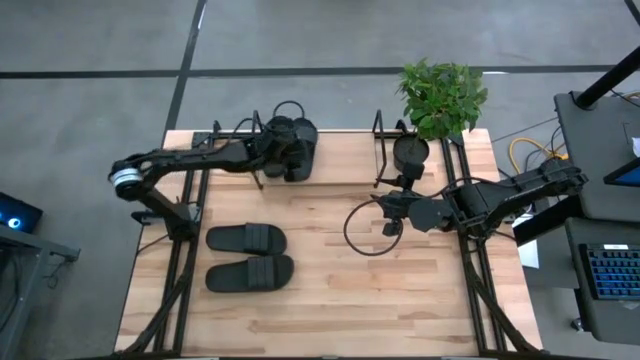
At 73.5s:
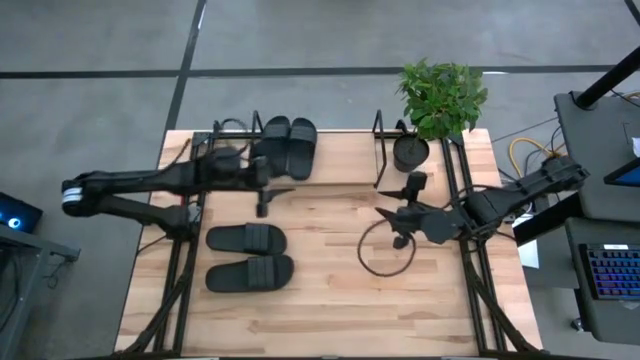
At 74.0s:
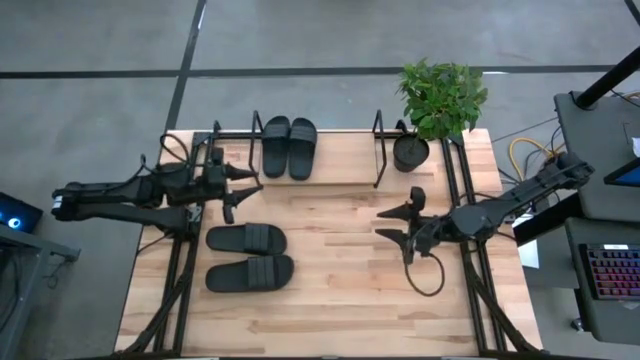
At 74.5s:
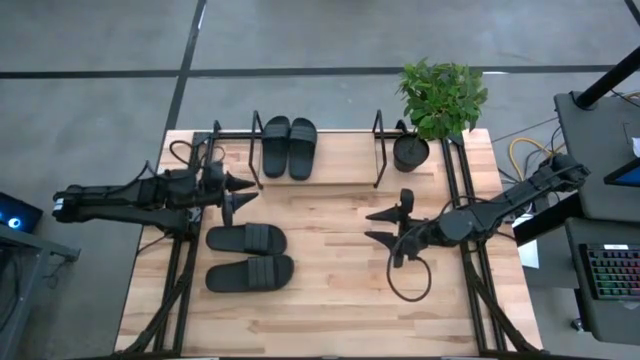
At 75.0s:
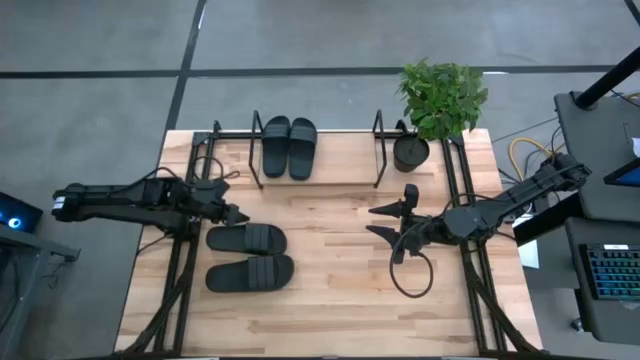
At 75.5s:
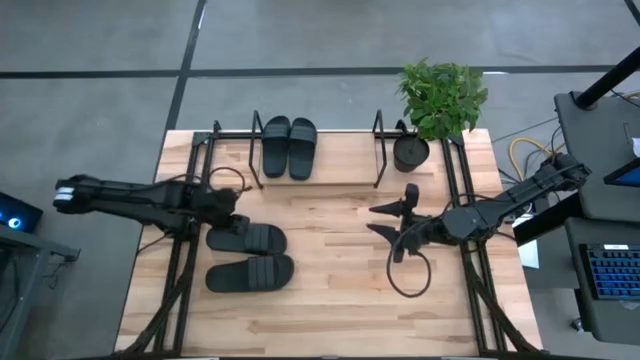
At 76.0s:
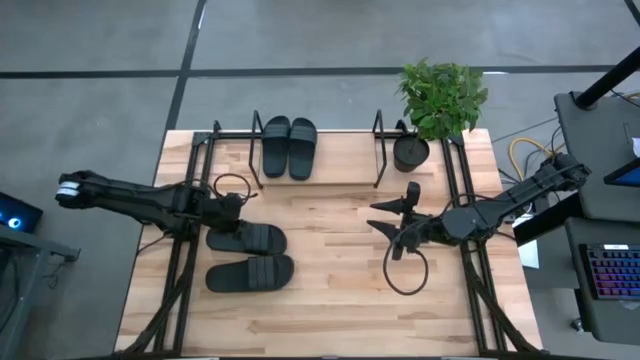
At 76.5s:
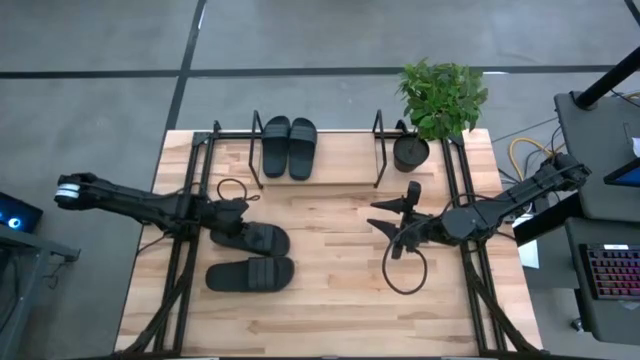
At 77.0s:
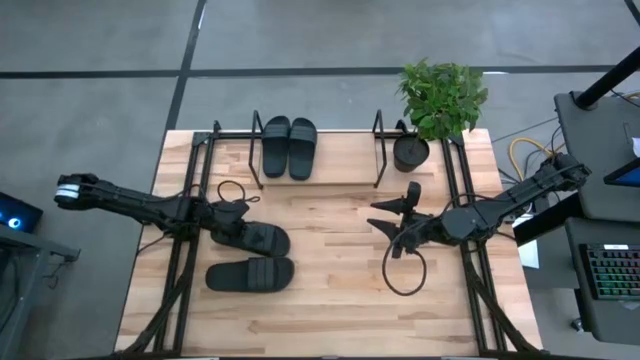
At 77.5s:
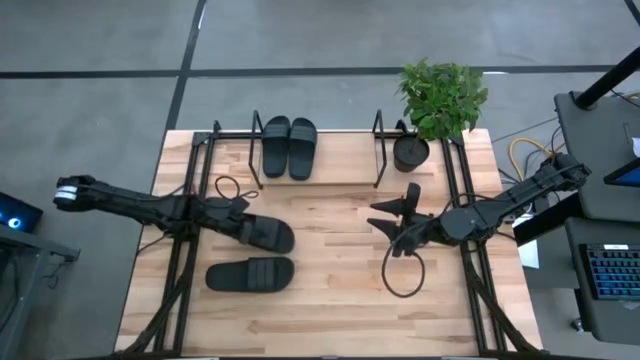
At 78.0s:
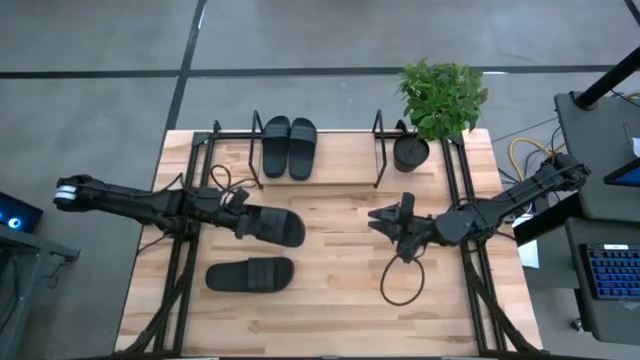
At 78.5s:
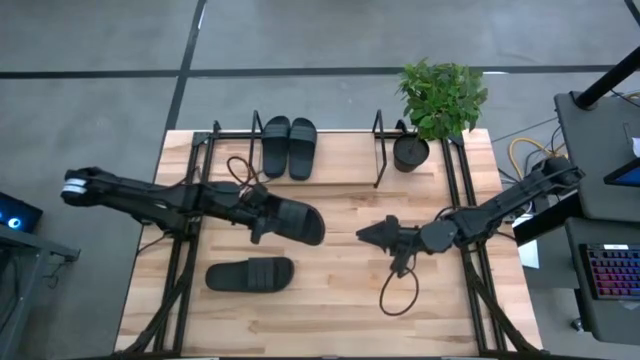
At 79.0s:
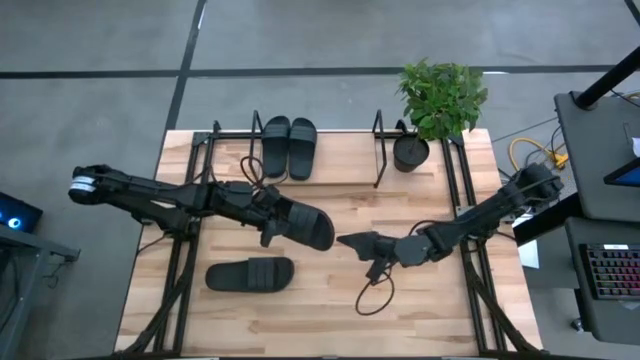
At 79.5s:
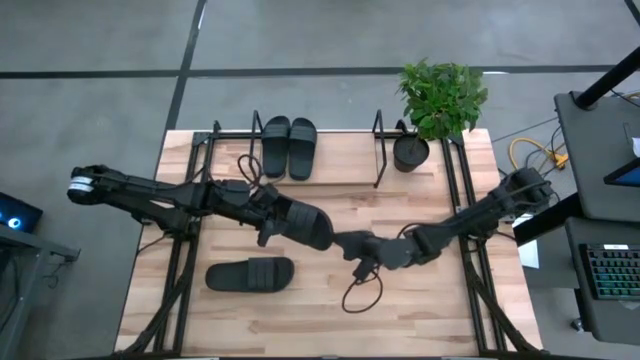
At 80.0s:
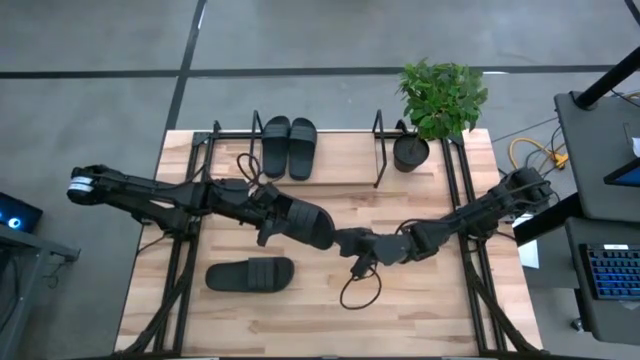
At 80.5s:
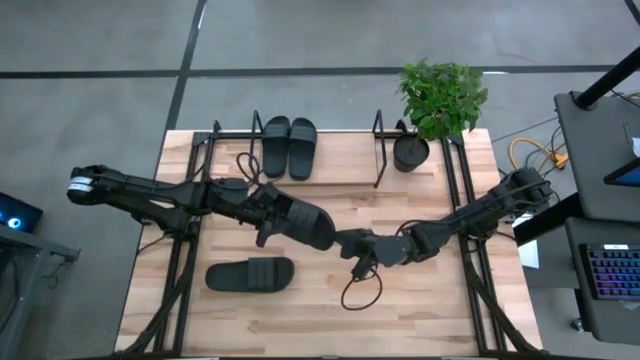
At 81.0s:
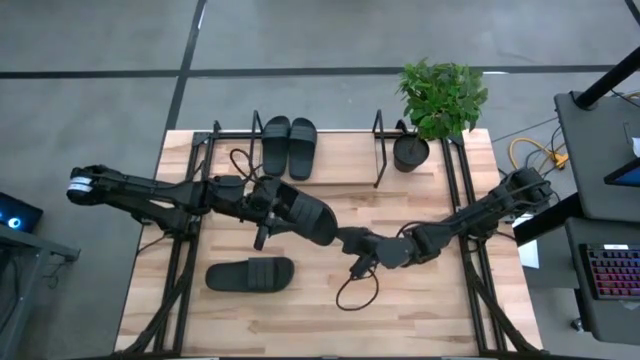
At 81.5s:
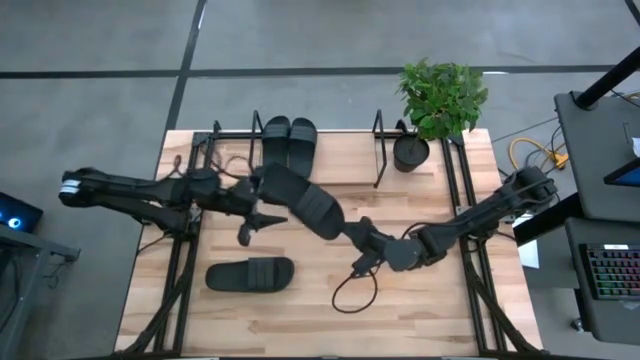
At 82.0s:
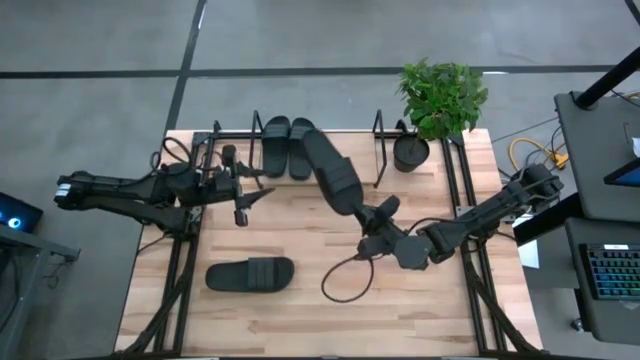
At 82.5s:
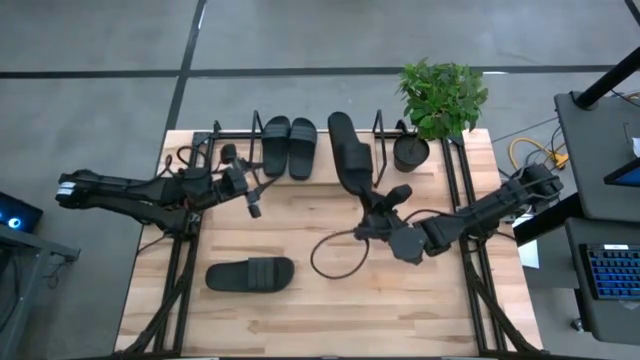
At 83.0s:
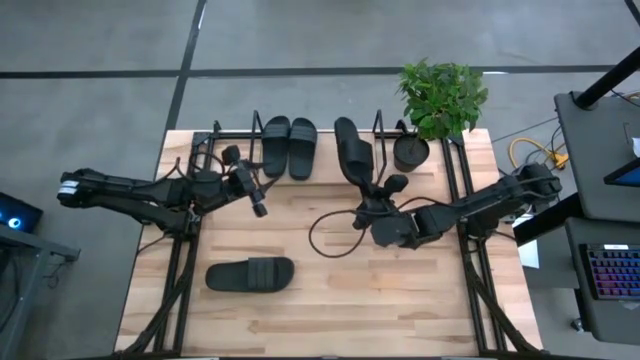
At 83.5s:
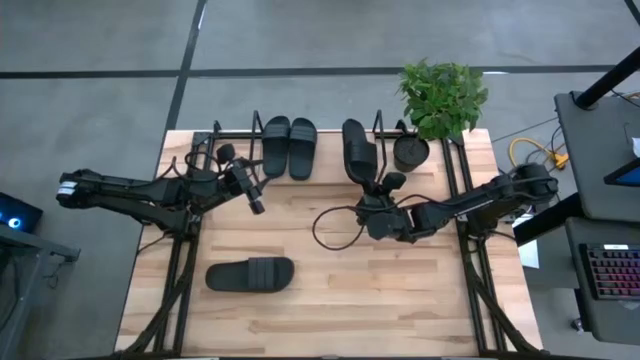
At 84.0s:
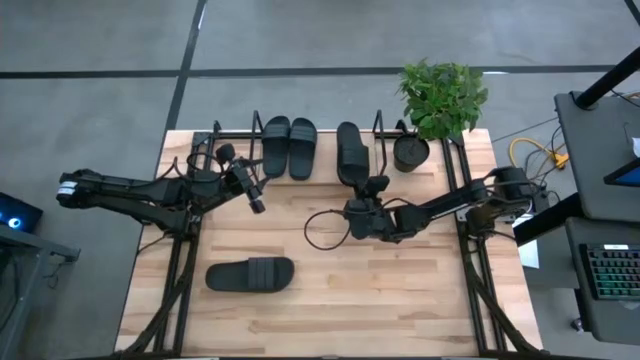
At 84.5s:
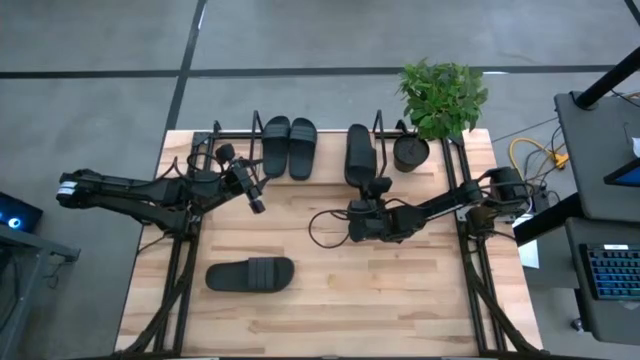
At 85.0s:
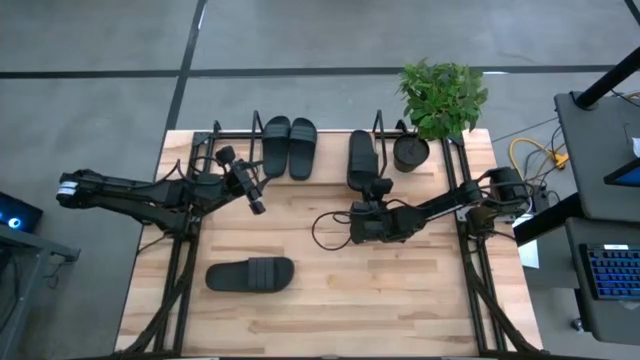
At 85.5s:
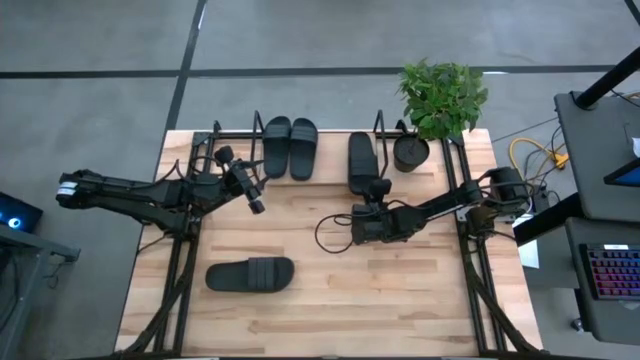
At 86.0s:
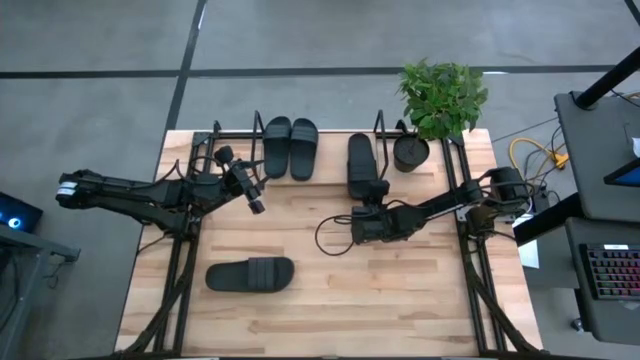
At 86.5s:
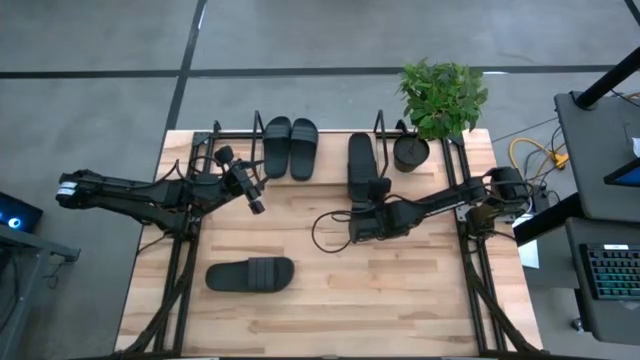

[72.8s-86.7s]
Task: Pick and place slides into the shelf
Put the black slide on the shelf

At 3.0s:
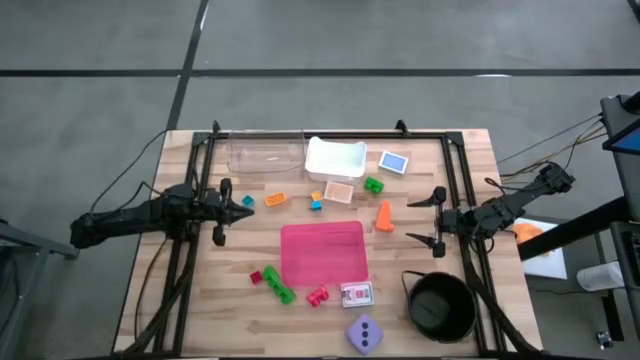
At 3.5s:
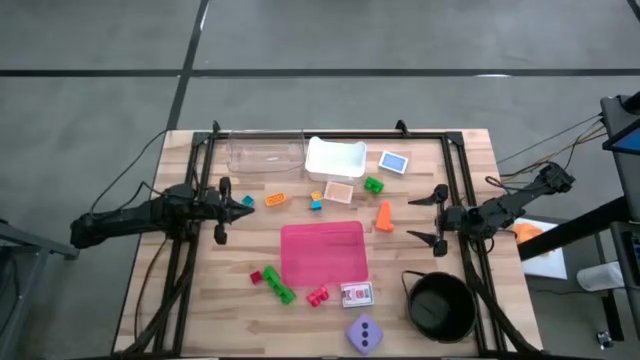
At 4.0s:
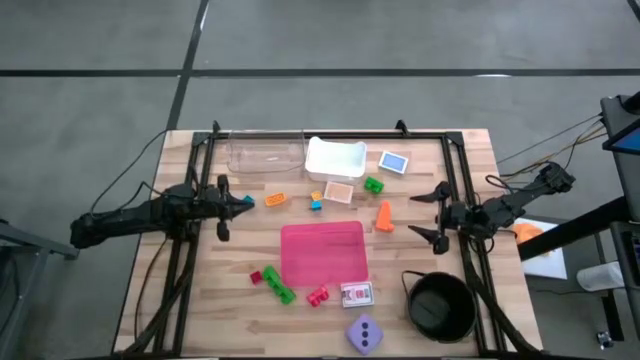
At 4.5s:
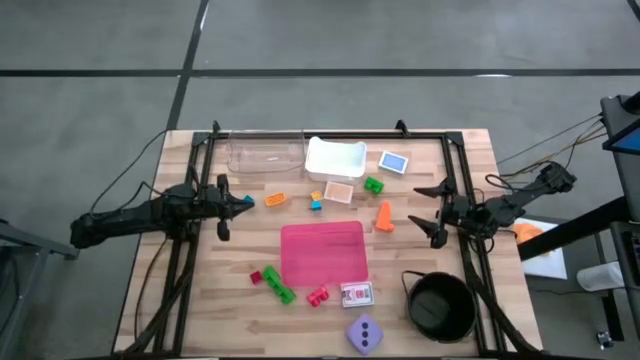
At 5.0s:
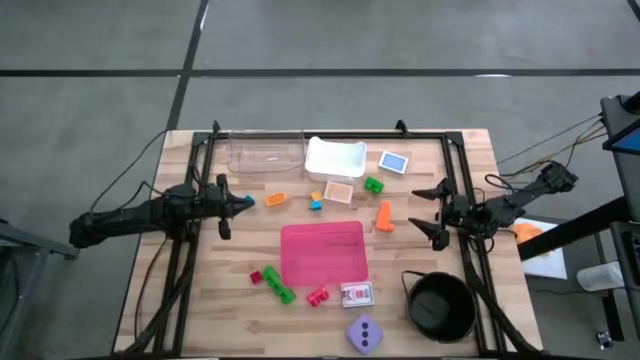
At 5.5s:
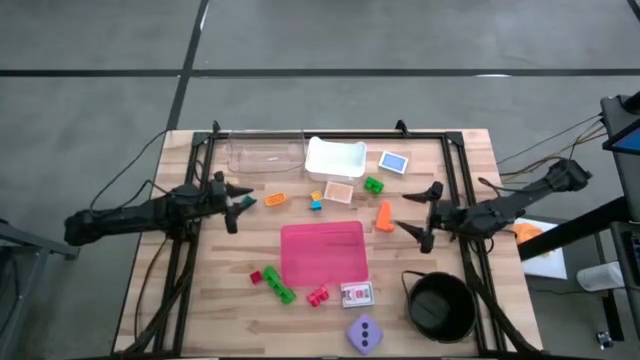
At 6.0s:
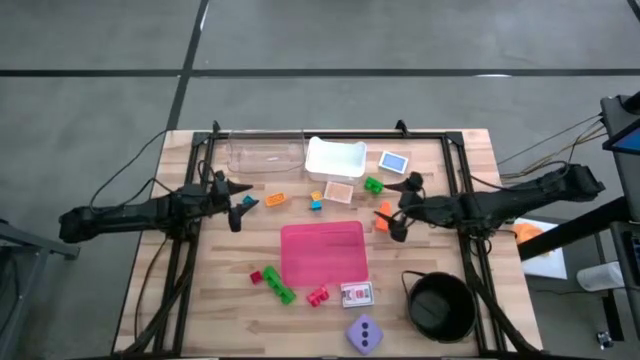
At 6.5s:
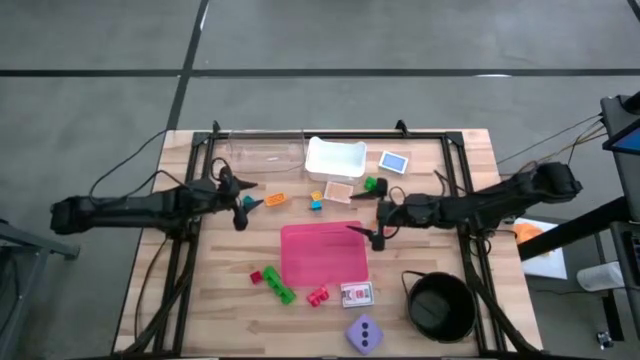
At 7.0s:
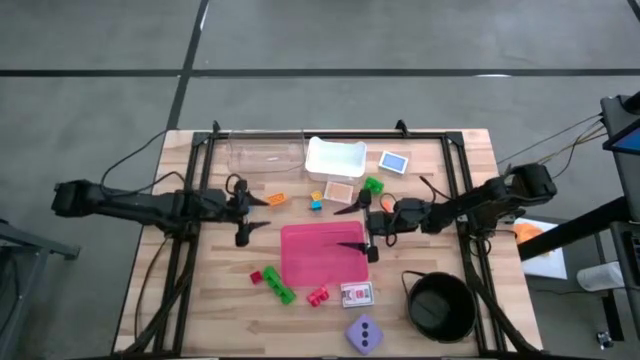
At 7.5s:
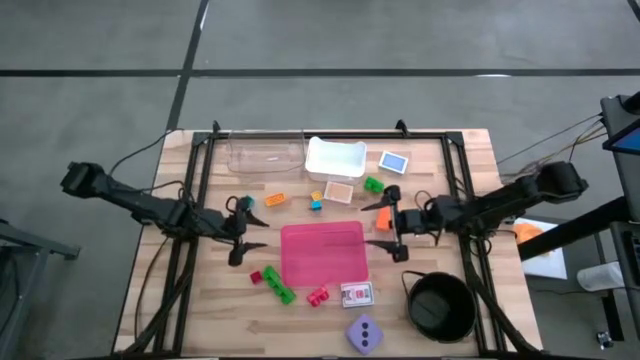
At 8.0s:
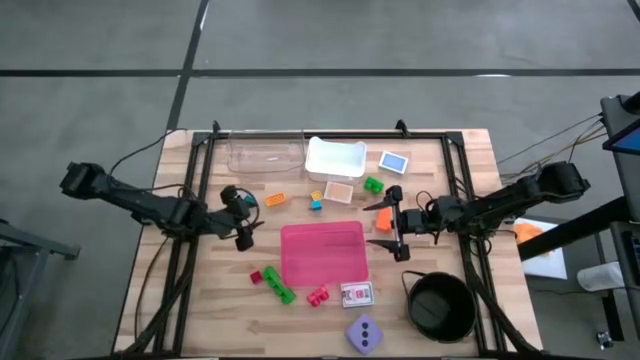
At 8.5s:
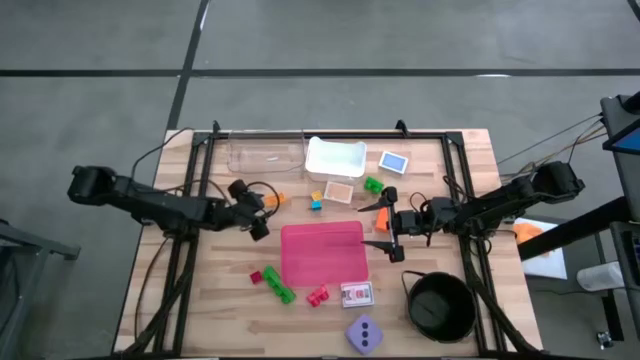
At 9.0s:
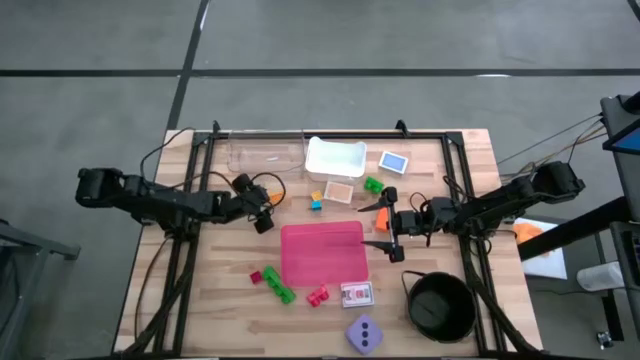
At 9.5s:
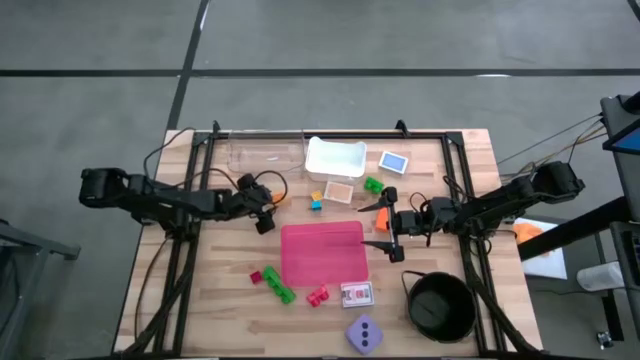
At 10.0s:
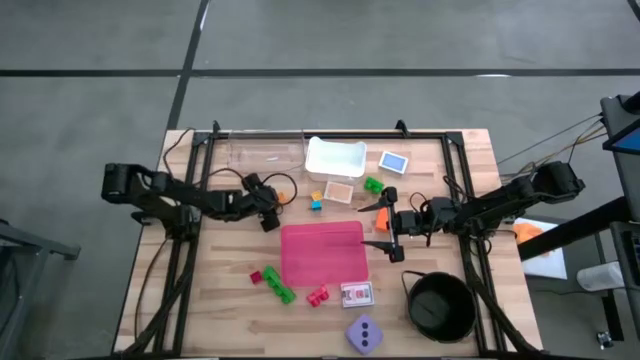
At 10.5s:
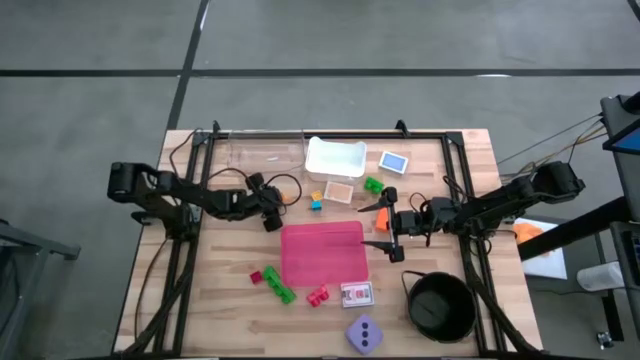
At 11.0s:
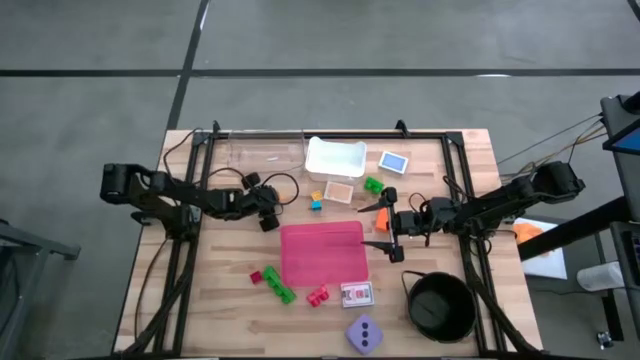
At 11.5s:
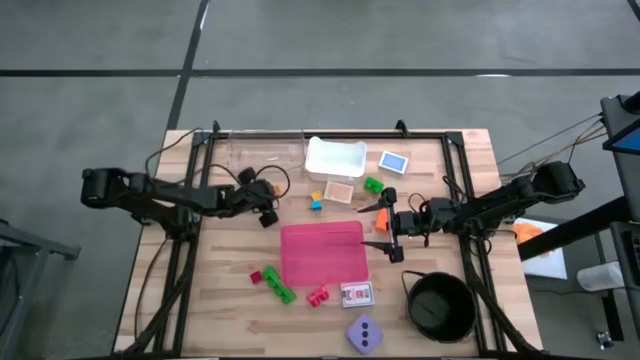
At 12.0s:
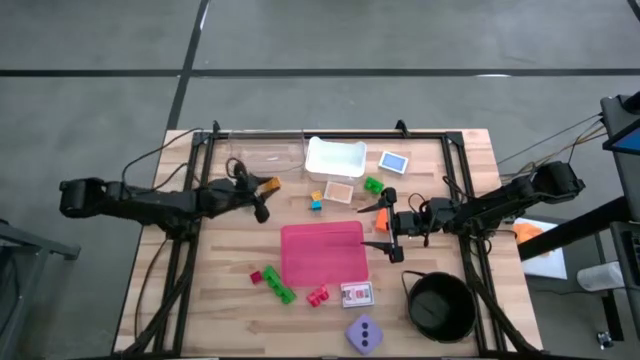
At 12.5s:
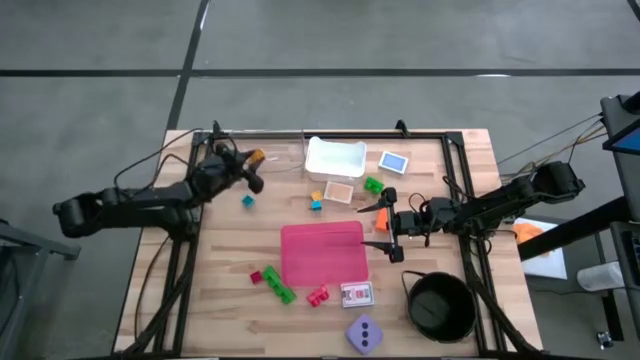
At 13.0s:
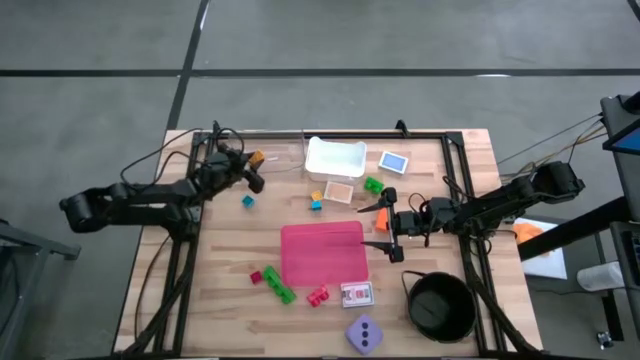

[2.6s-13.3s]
Task: Pick & Place Toys
Put the left yellow game piece into the transparent bin
